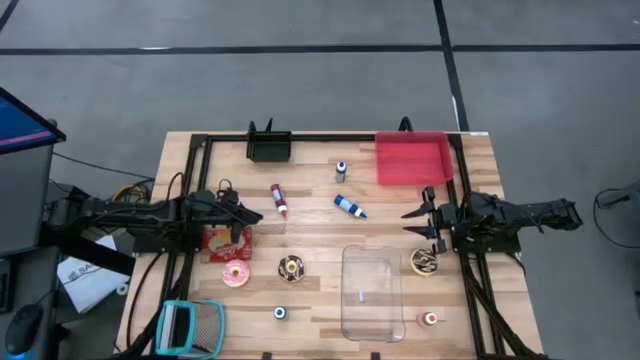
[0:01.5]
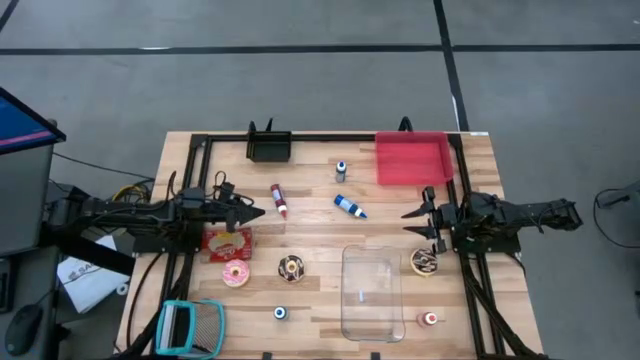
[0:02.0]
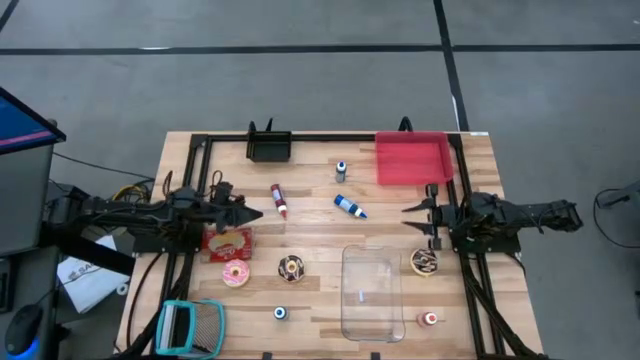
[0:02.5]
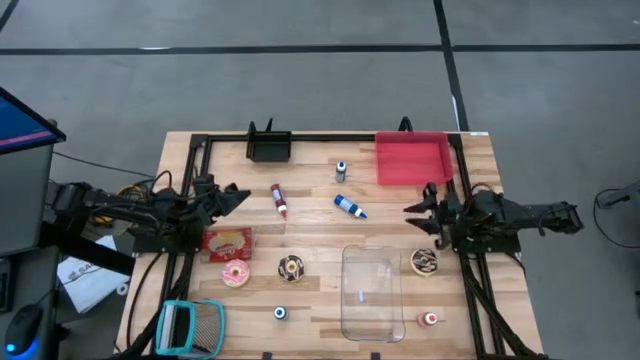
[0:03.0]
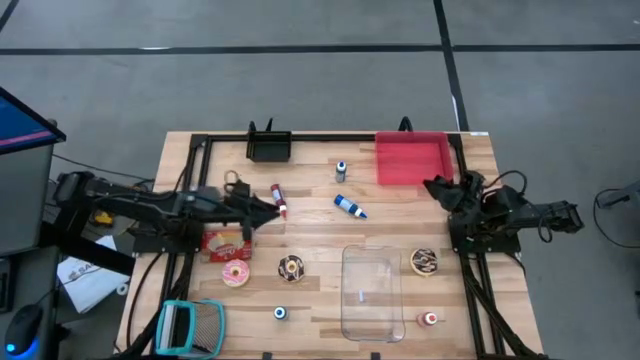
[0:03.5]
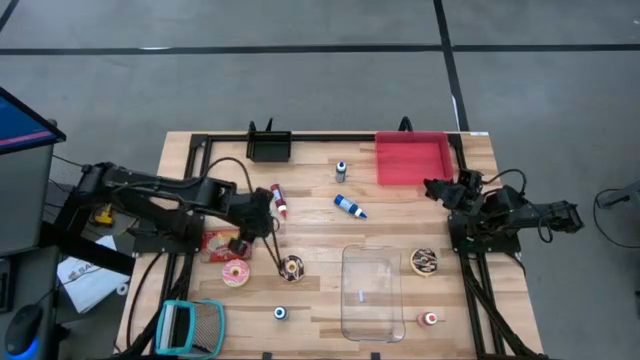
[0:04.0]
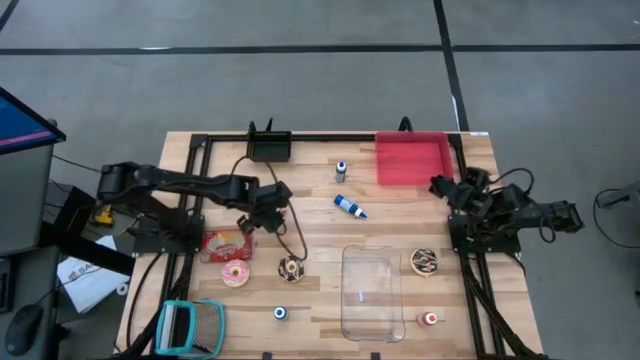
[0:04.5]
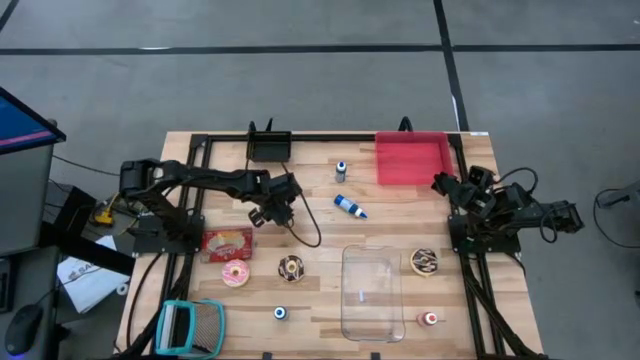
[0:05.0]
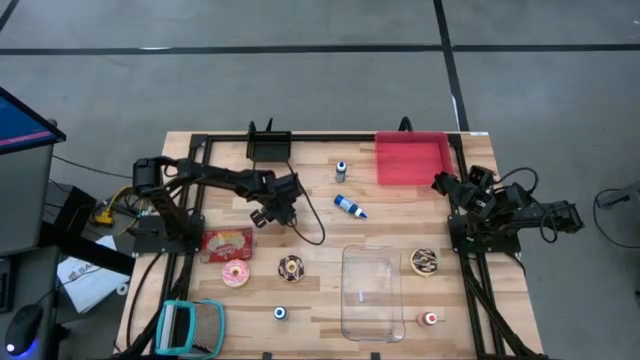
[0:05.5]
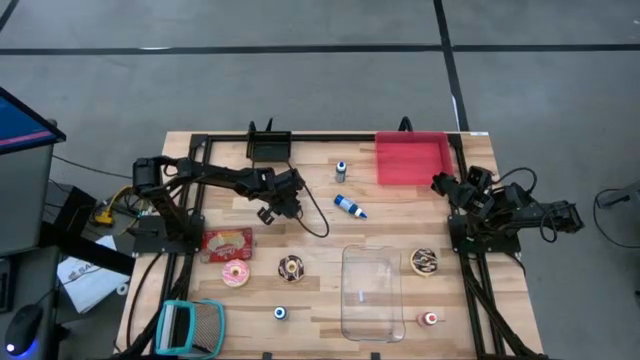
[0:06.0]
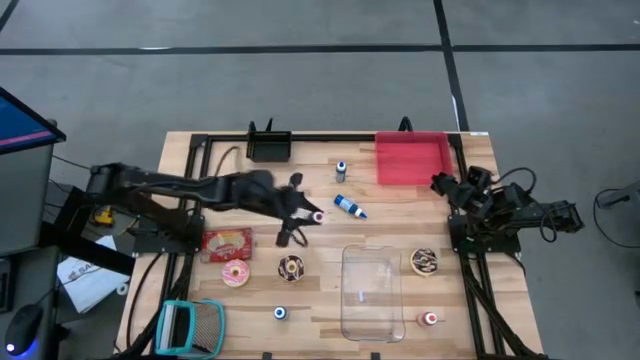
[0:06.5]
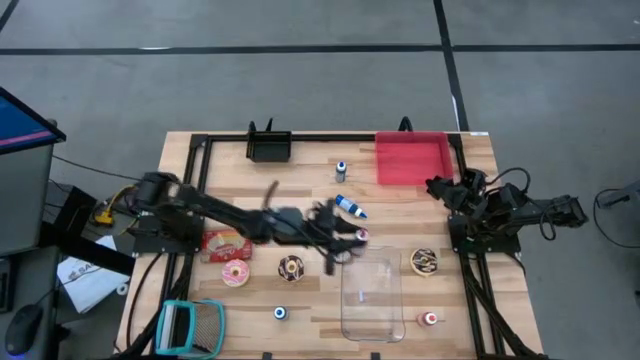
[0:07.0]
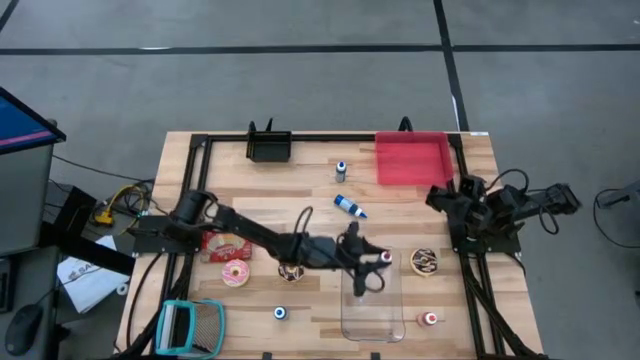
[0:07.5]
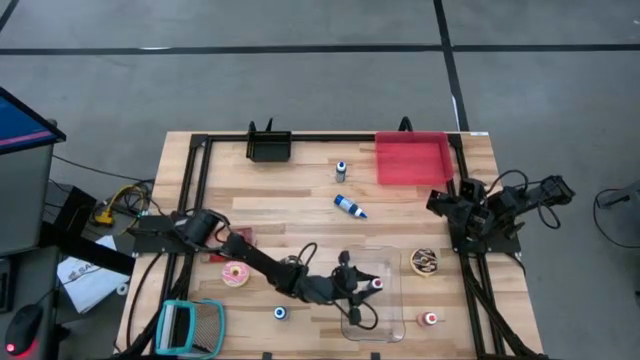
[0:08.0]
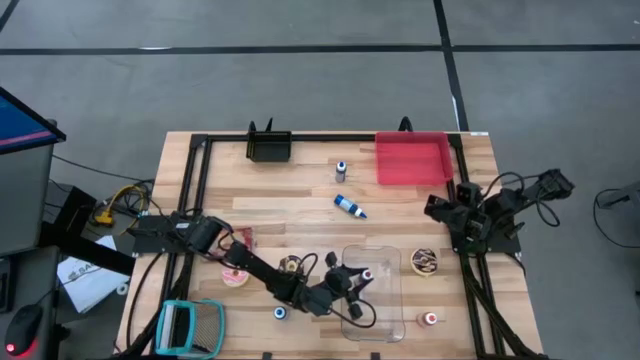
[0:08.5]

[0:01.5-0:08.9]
Put the red food coloring bottle into the transparent bin

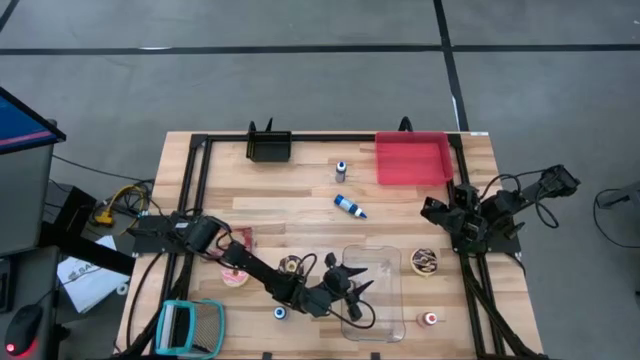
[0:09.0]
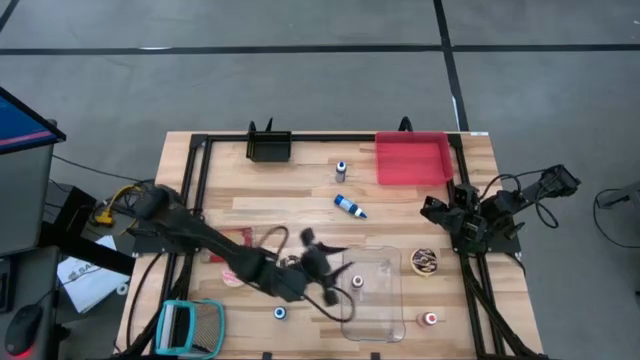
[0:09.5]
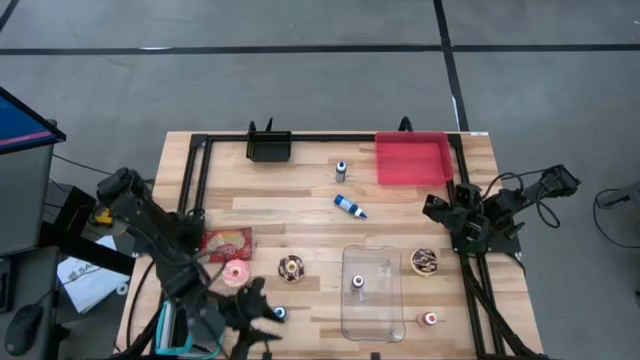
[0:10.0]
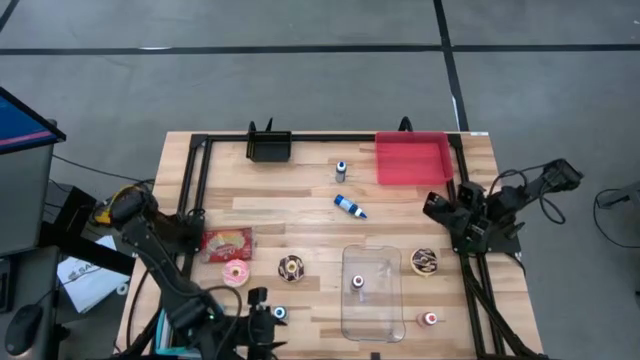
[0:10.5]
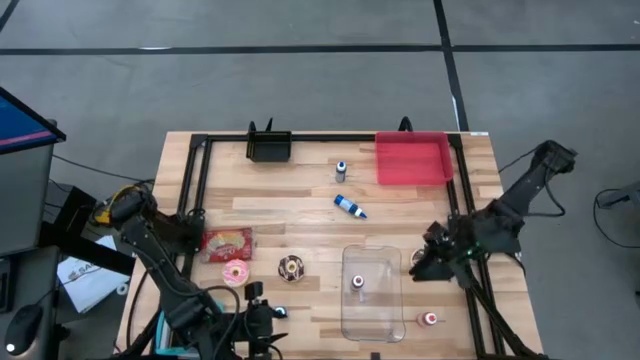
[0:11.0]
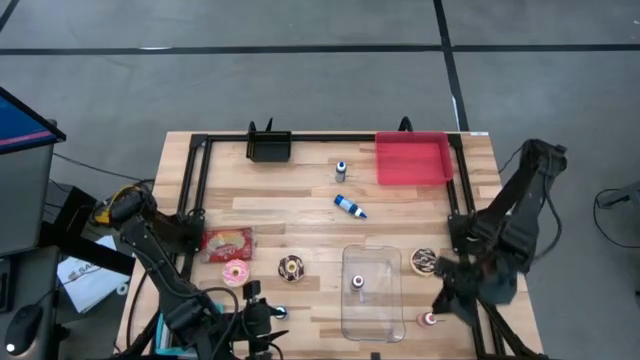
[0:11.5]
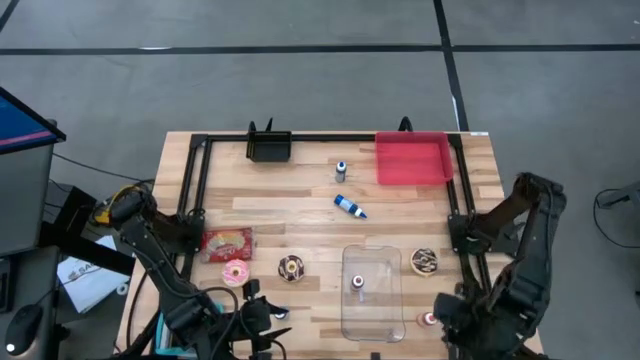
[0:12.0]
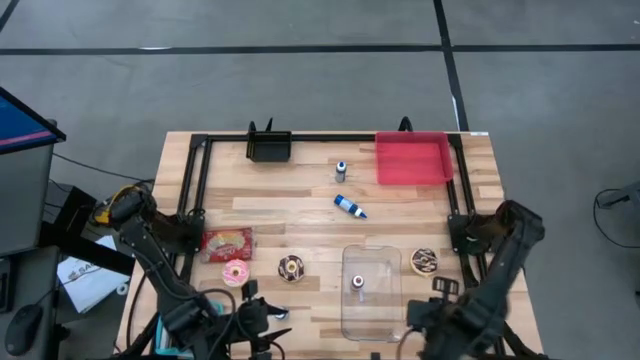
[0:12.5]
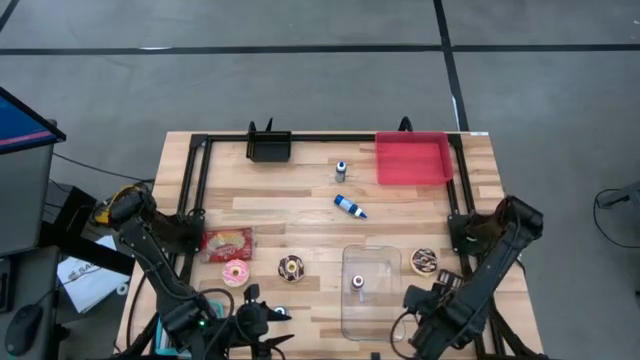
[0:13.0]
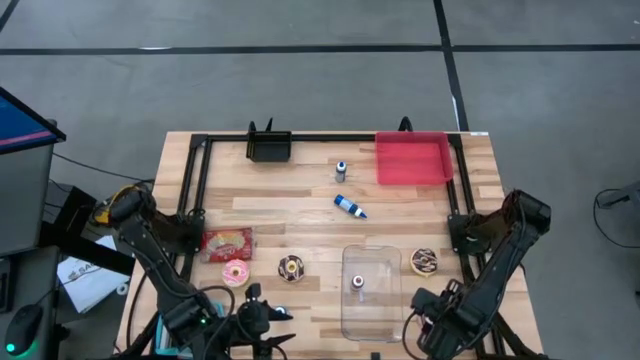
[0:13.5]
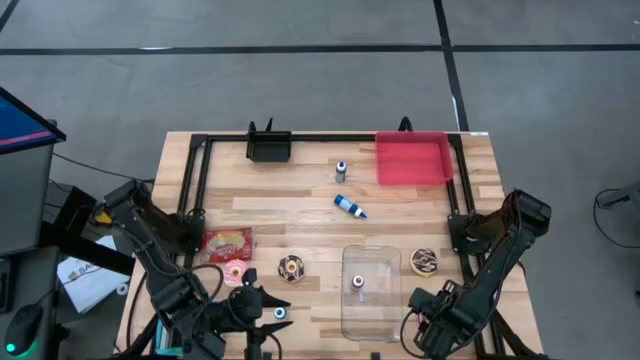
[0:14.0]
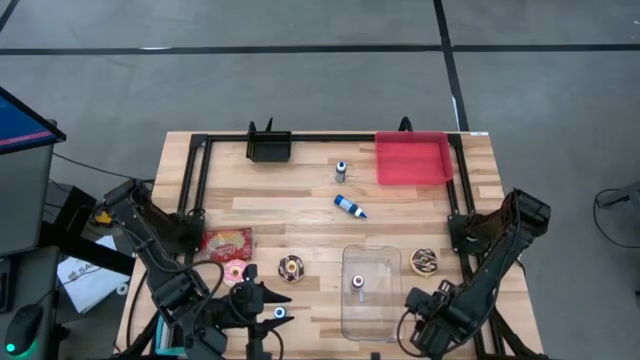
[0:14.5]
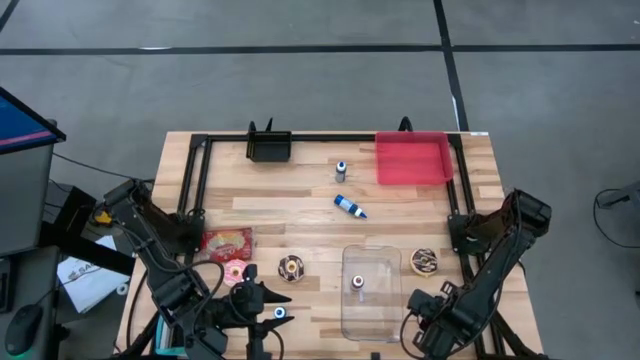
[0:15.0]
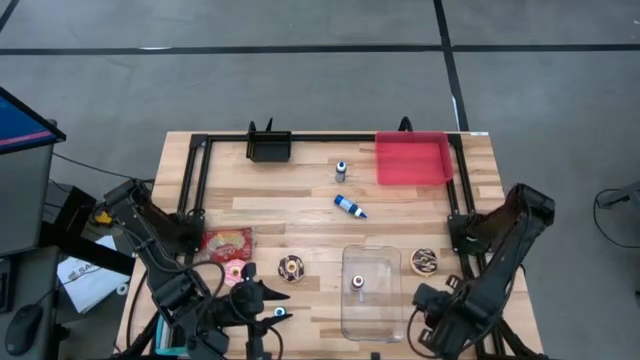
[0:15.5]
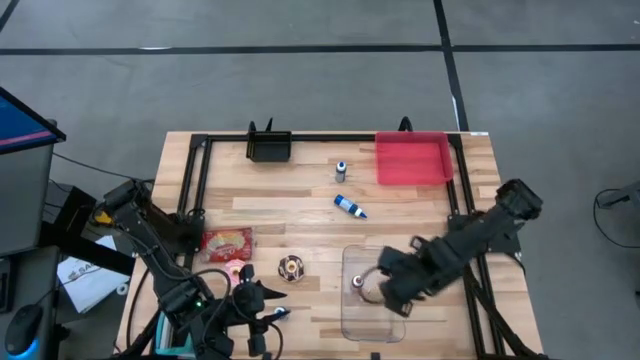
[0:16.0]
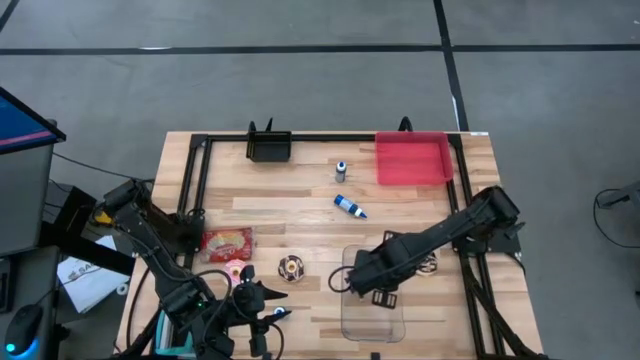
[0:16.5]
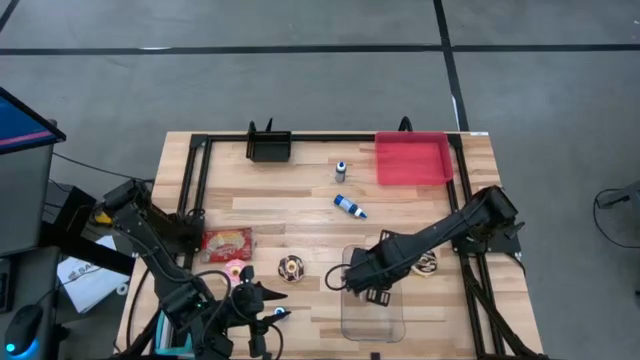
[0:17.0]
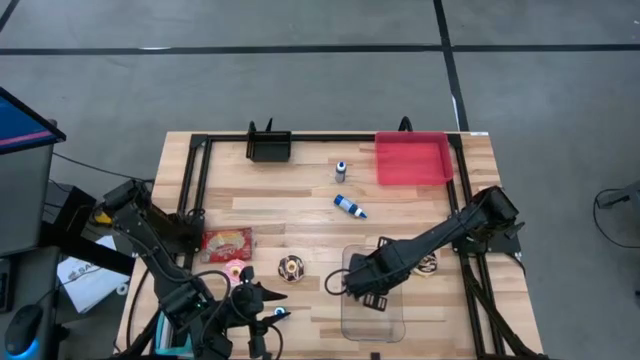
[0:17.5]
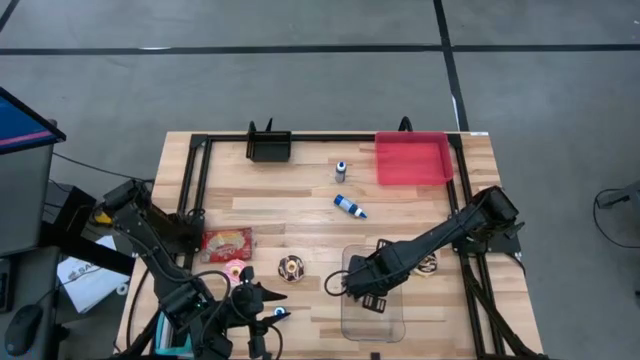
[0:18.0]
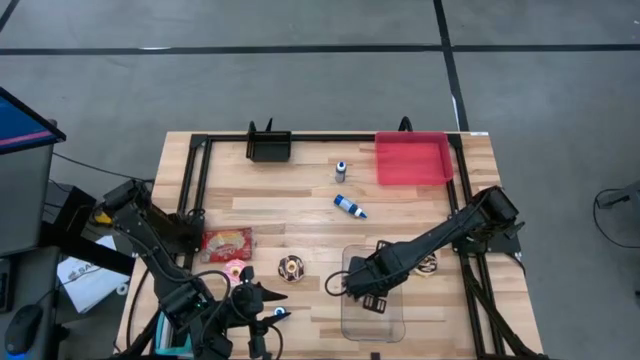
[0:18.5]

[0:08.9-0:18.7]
Put the orange food coloring bottle into the transparent bin

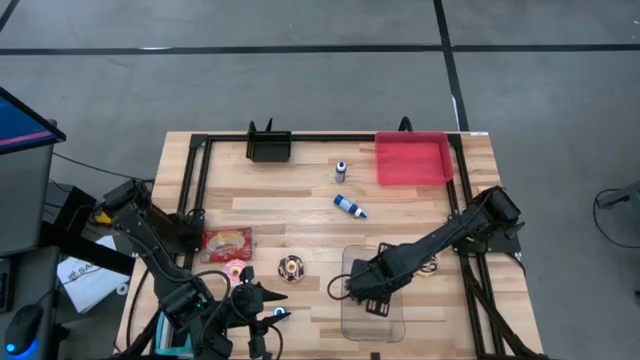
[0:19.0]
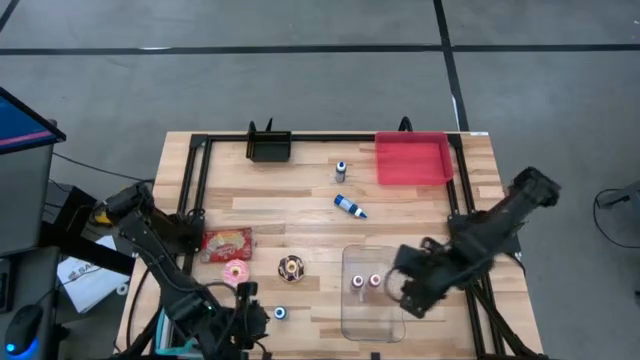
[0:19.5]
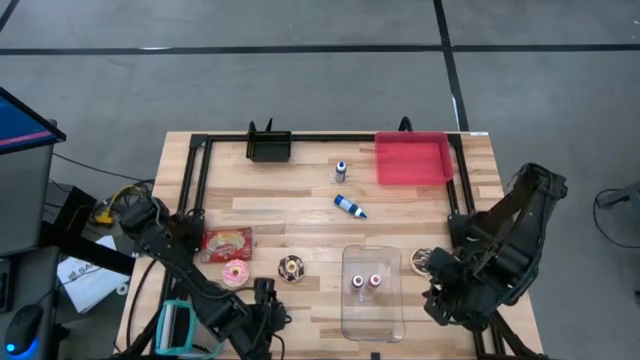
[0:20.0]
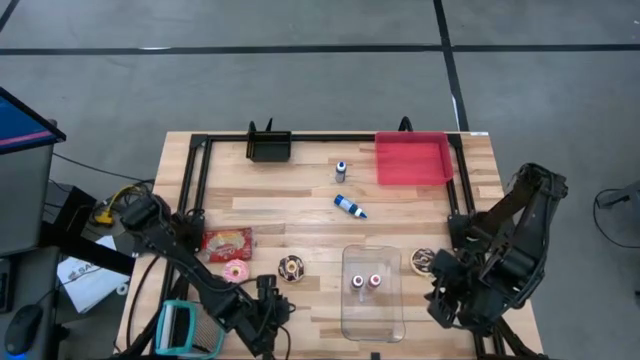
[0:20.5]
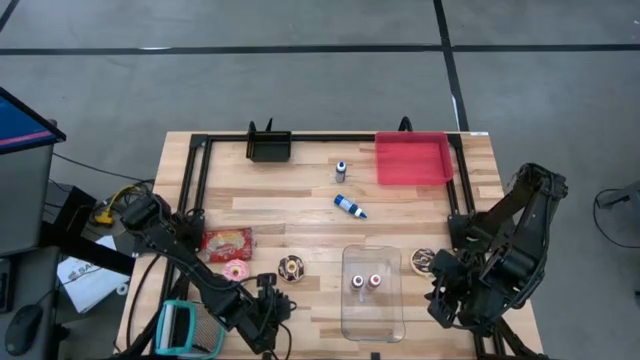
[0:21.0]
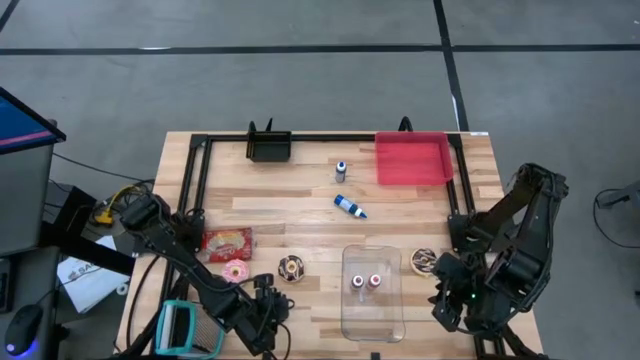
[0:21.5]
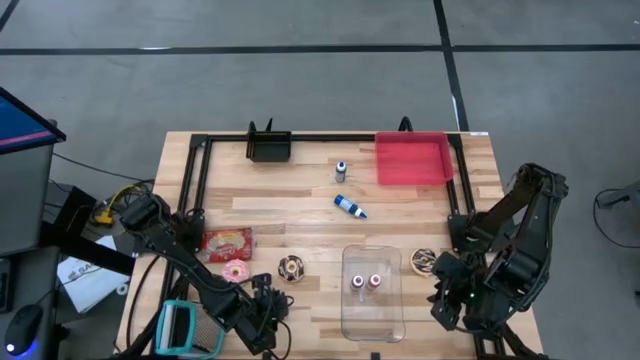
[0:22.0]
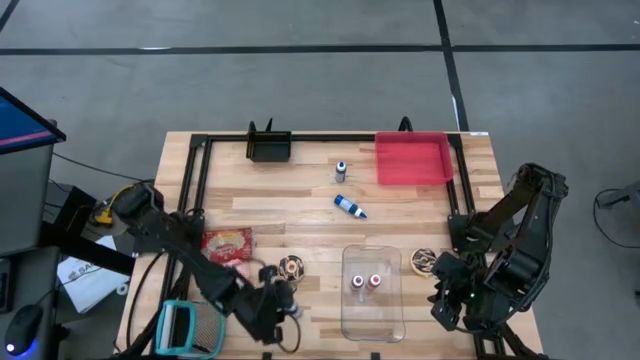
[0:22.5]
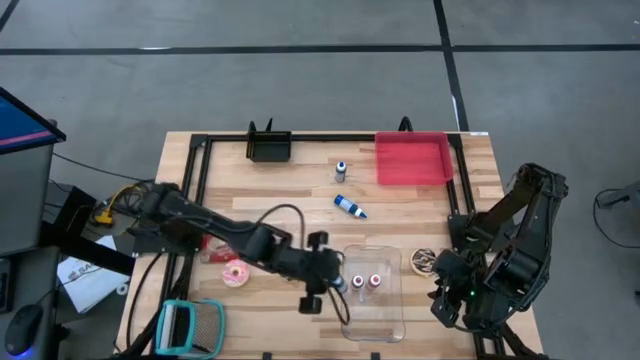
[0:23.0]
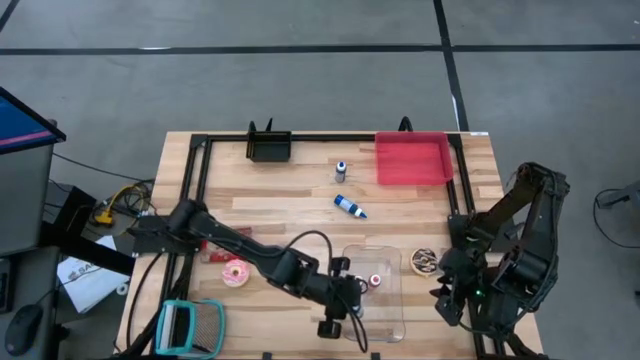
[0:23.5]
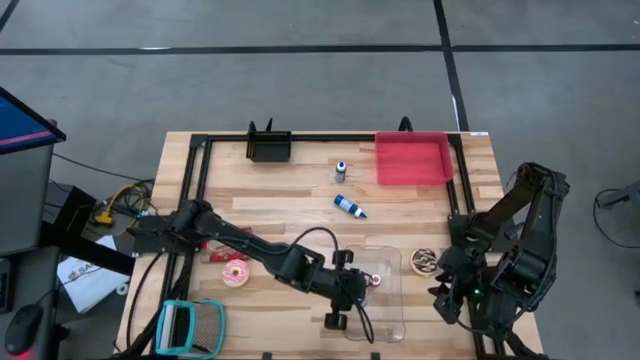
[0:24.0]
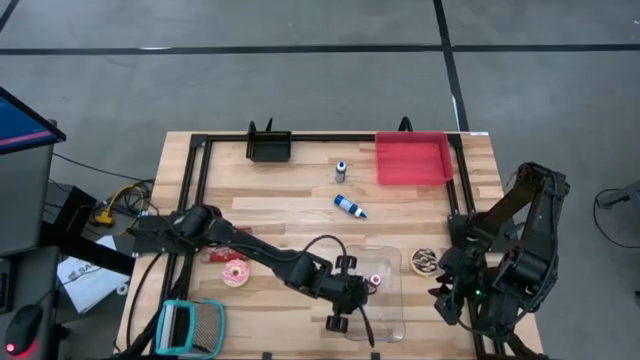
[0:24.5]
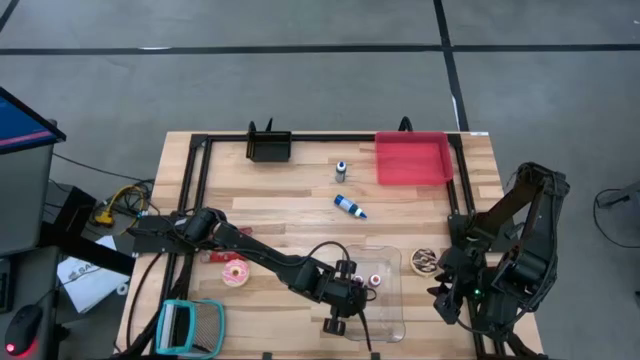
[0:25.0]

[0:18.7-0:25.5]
Put the bottom blue food coloring bottle into the transparent bin
